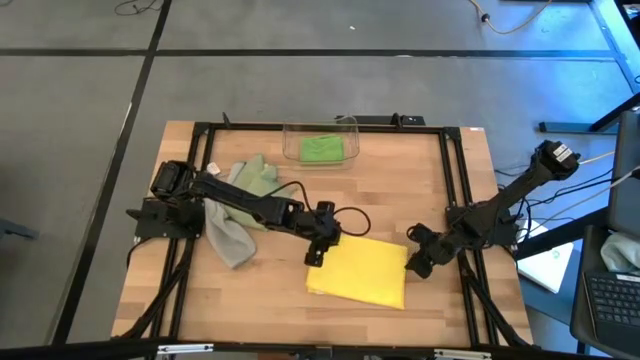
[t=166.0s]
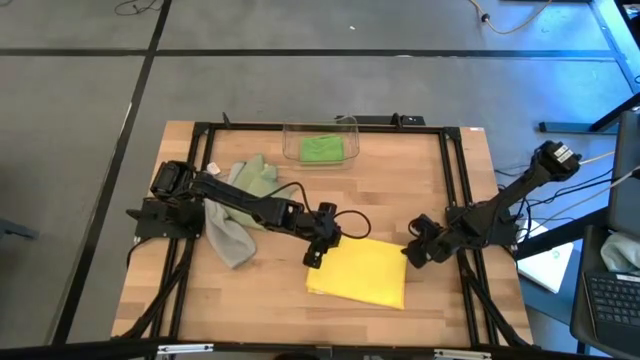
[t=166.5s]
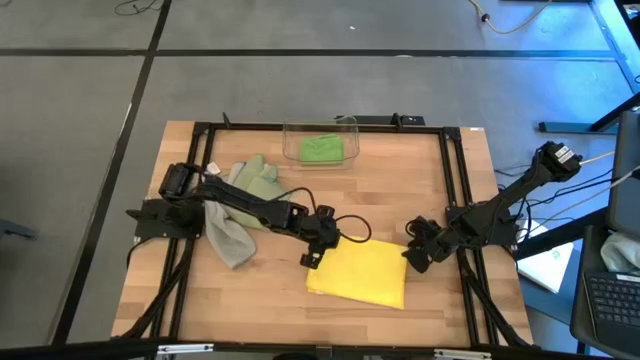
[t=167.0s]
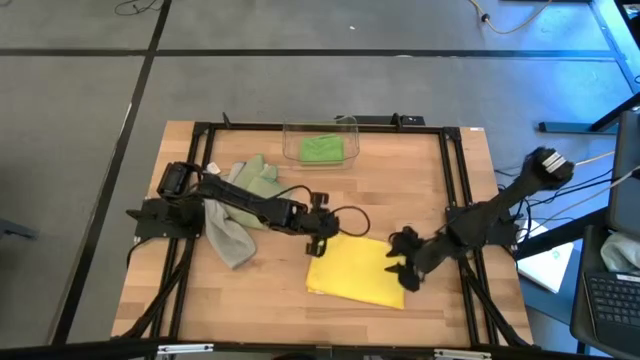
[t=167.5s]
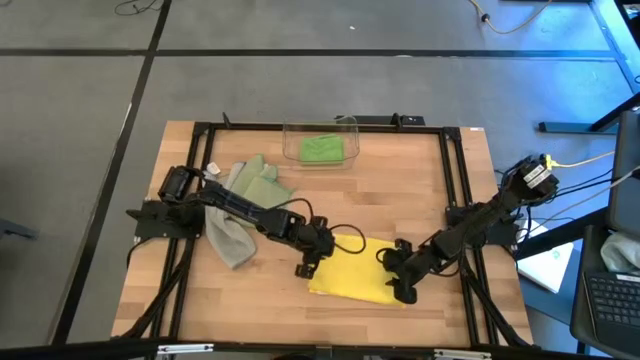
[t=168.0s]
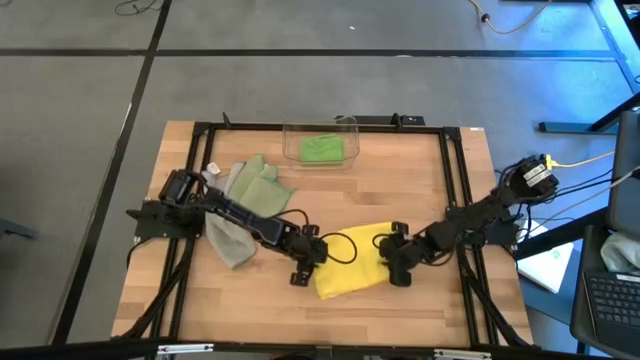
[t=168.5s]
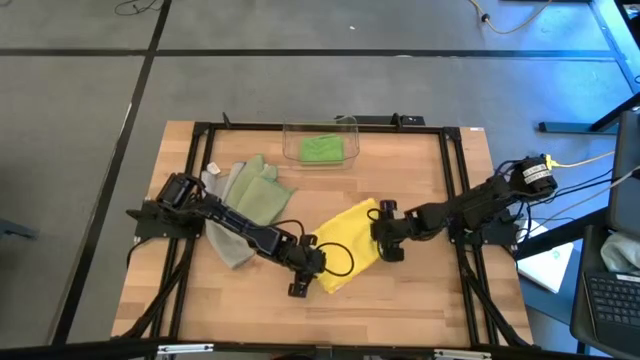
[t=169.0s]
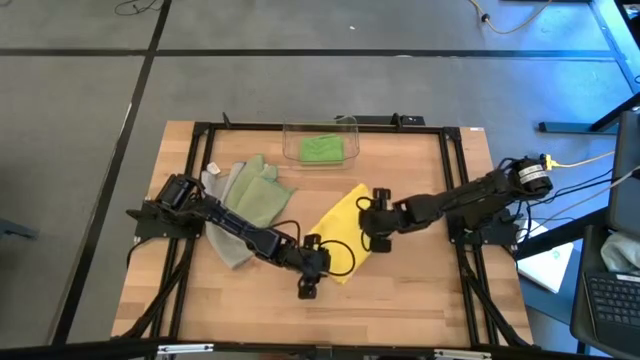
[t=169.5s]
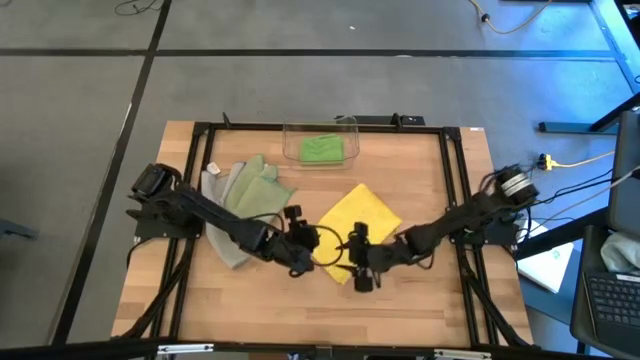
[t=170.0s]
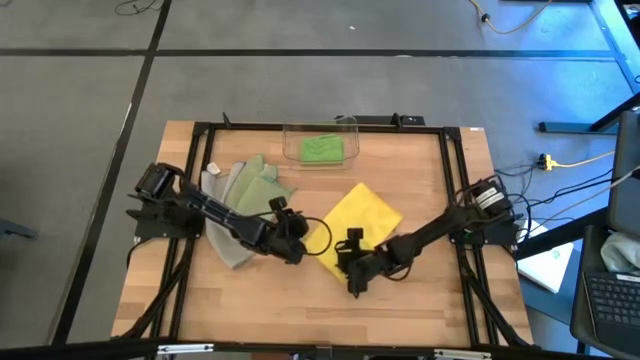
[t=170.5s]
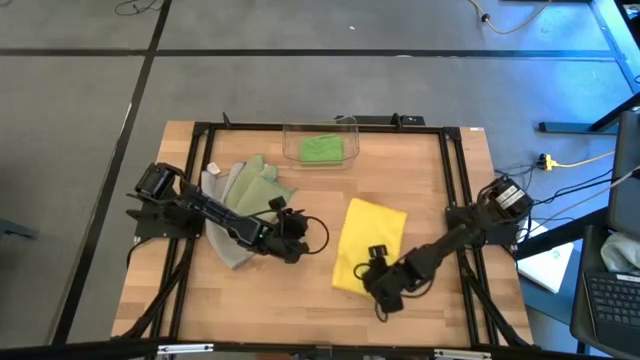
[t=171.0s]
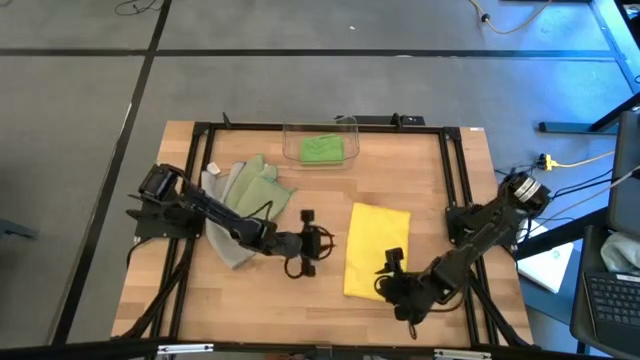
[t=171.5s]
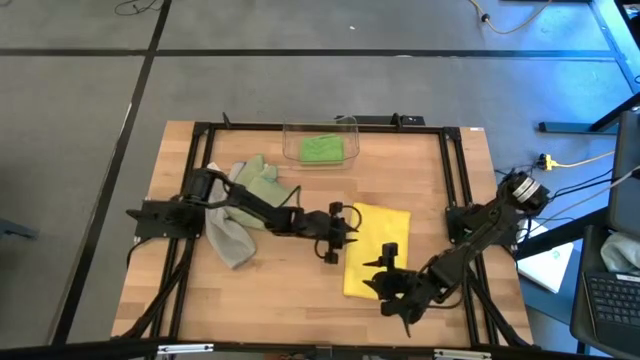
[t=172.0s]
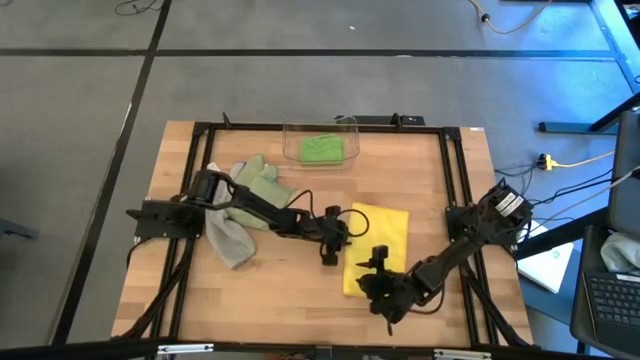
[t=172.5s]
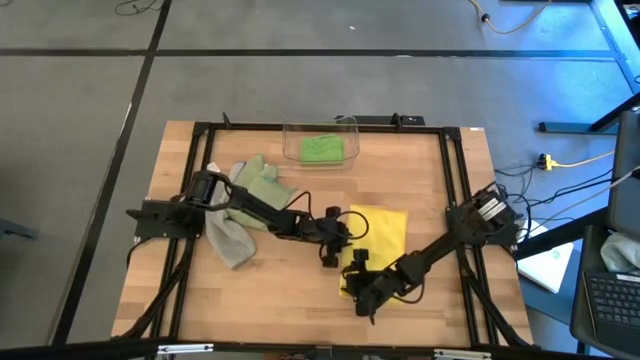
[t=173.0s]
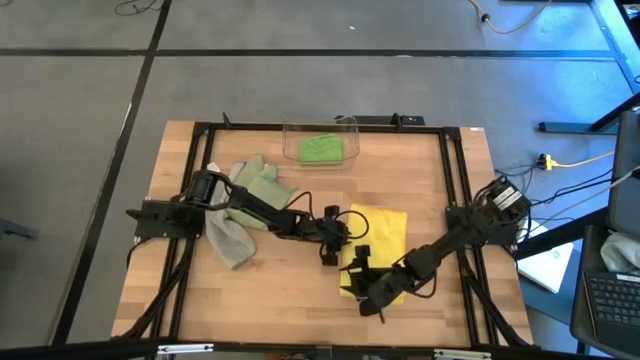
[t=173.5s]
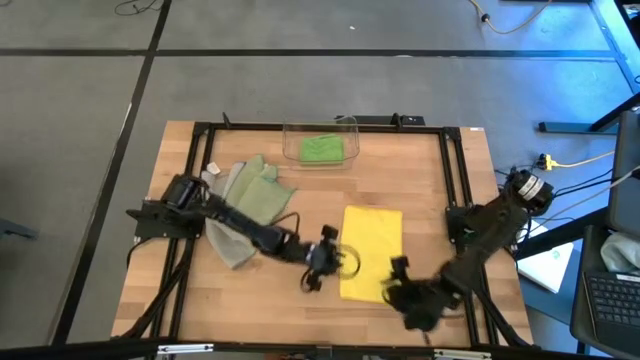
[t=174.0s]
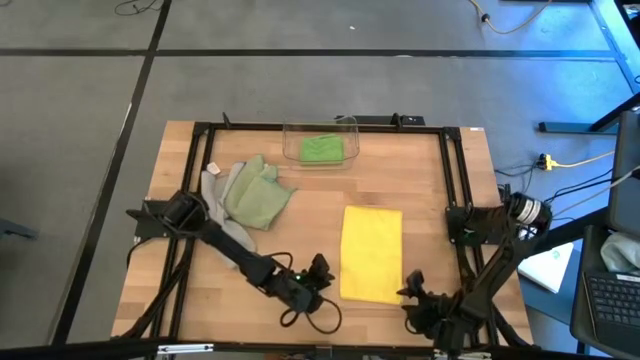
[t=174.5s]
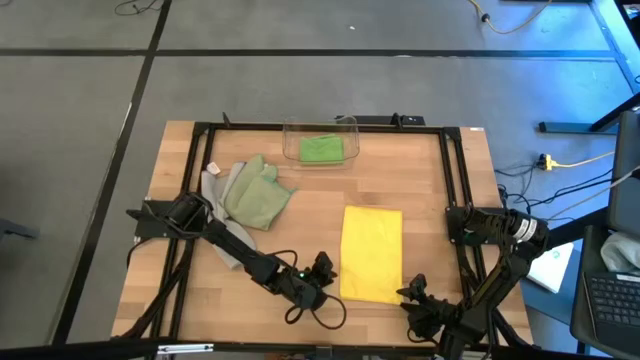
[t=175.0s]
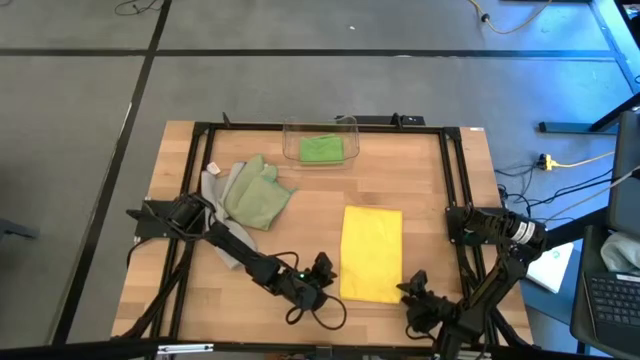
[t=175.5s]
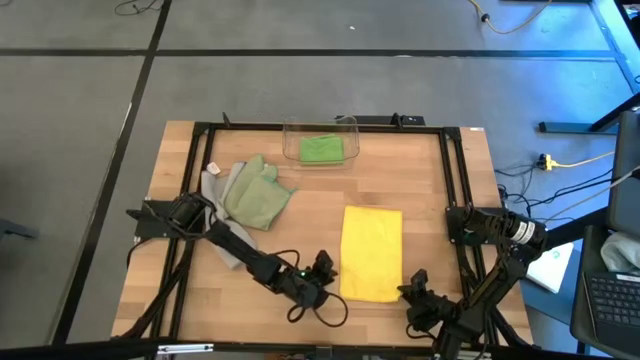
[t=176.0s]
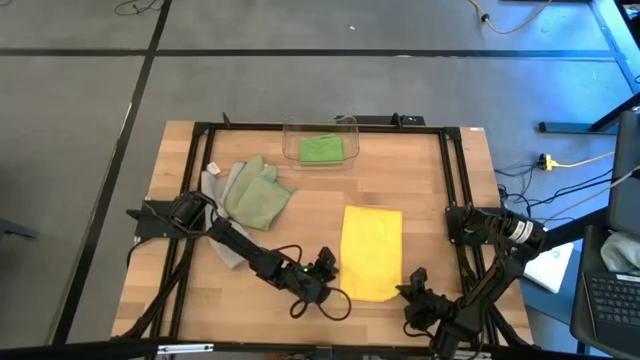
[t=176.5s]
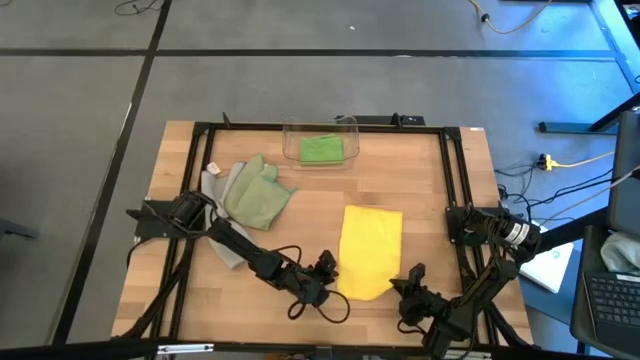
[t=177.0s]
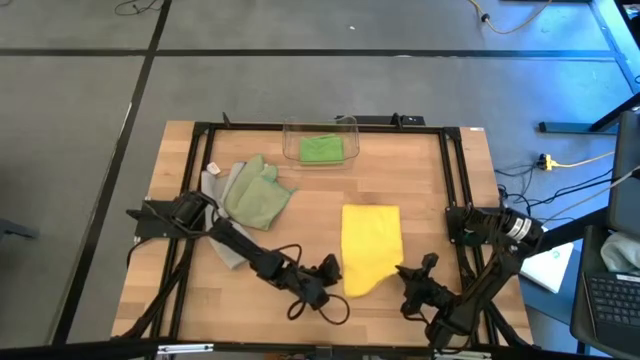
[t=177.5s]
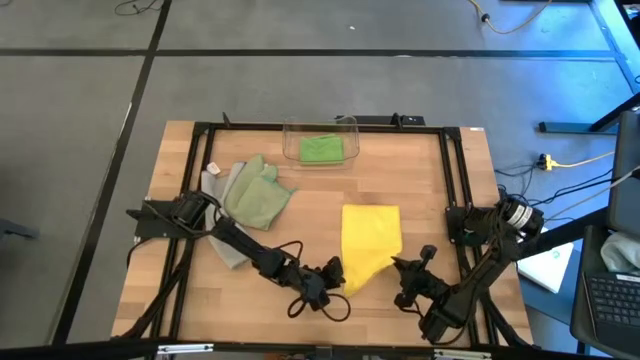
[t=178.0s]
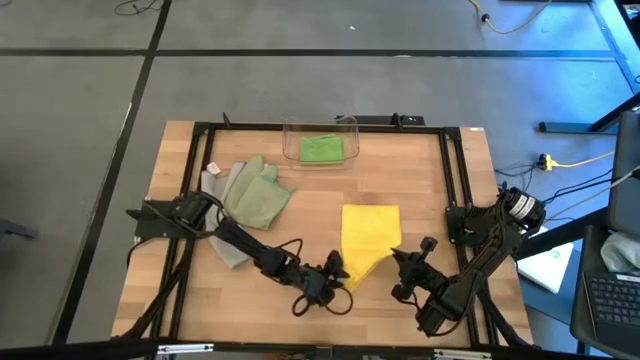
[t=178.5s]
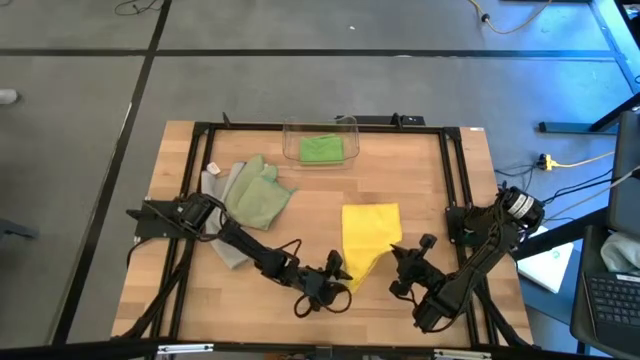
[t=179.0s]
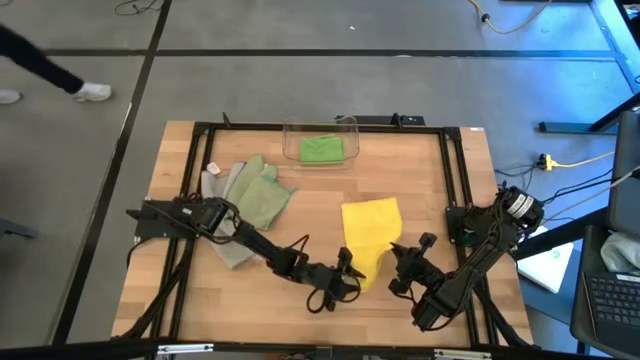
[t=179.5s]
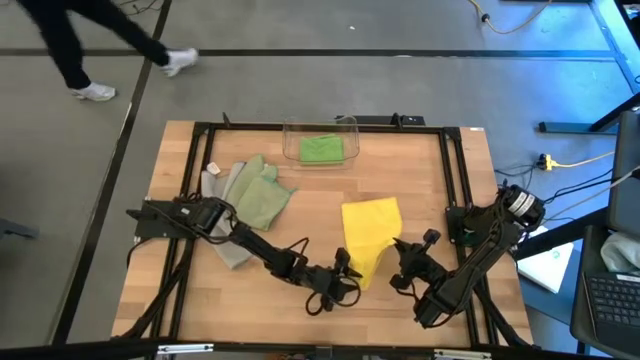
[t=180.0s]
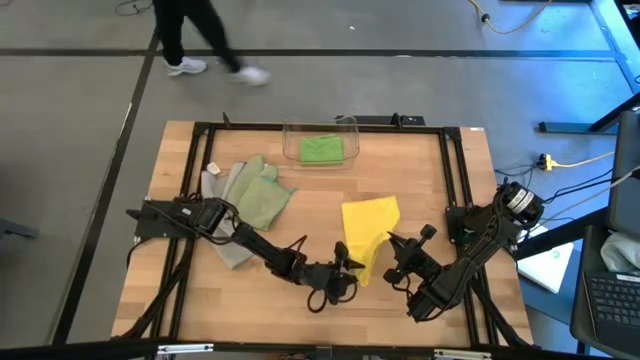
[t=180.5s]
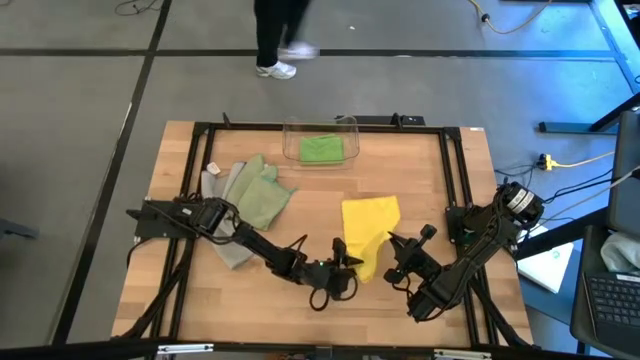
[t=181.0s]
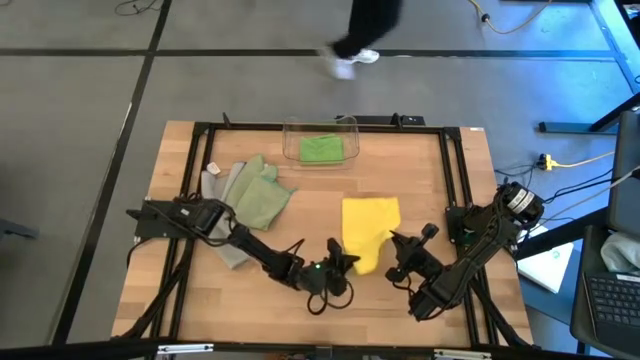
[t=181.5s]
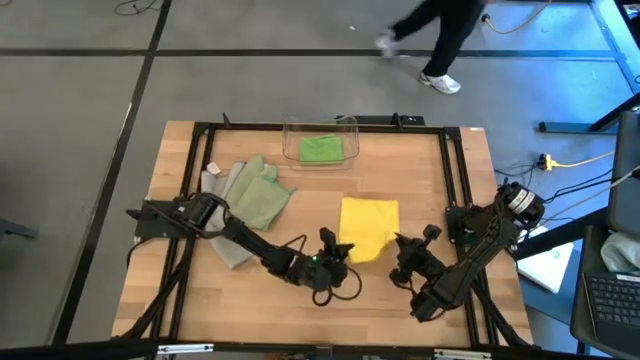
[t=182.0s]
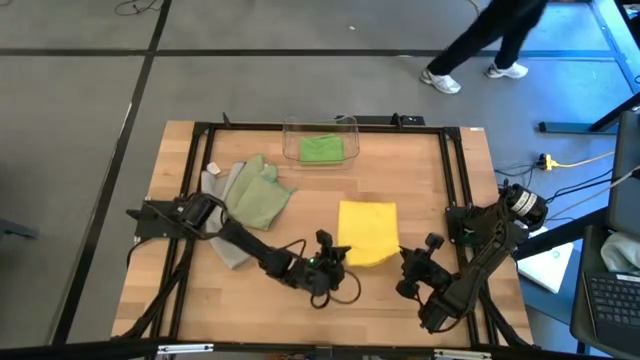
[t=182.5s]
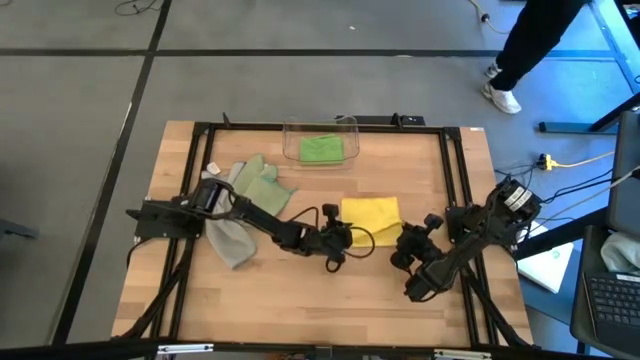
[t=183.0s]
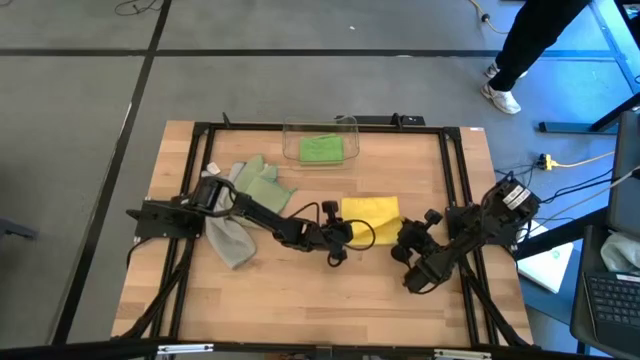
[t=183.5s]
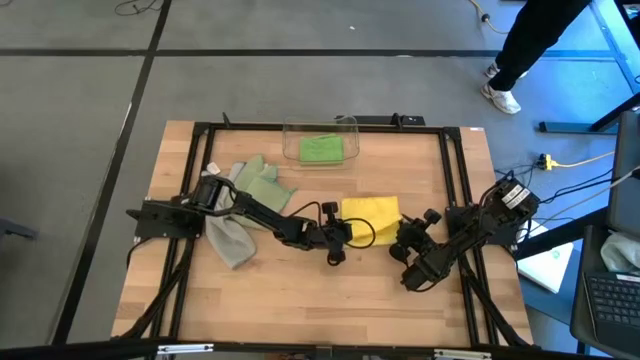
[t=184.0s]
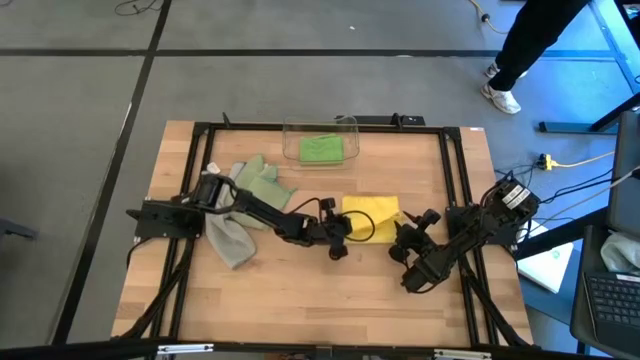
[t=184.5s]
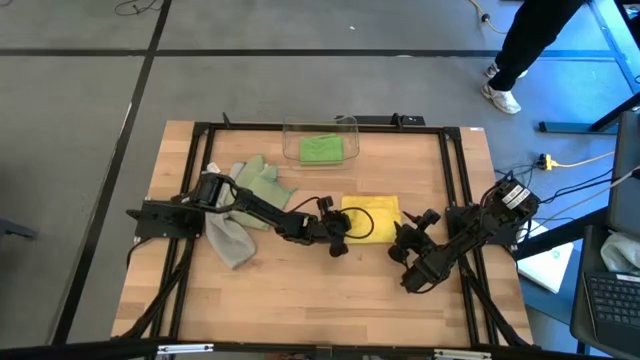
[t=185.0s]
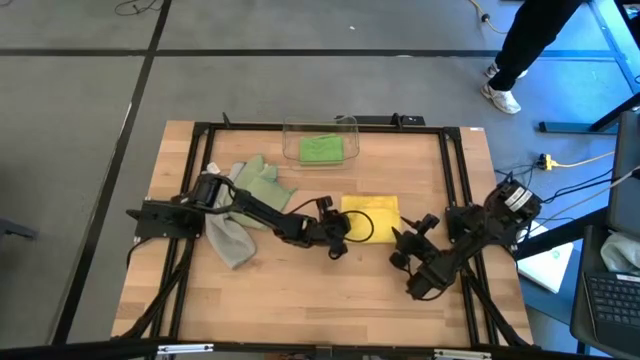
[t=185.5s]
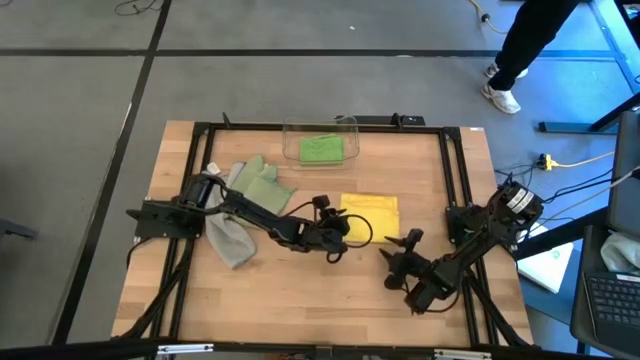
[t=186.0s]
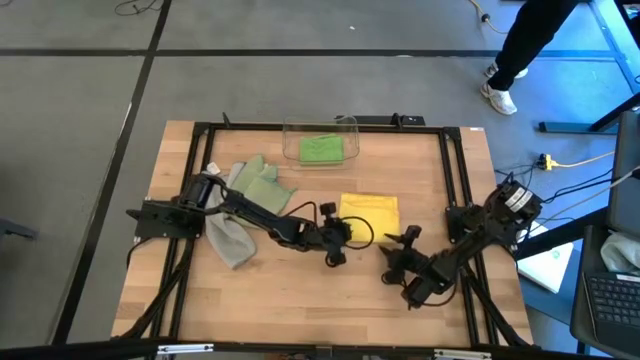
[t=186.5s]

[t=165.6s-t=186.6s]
Task: Fold microfiber towels
Fold the yellow microfiber cloth
